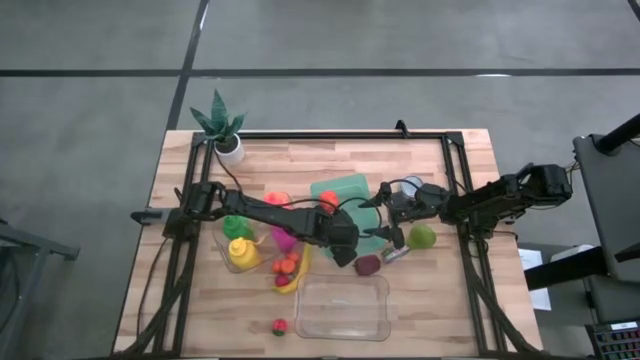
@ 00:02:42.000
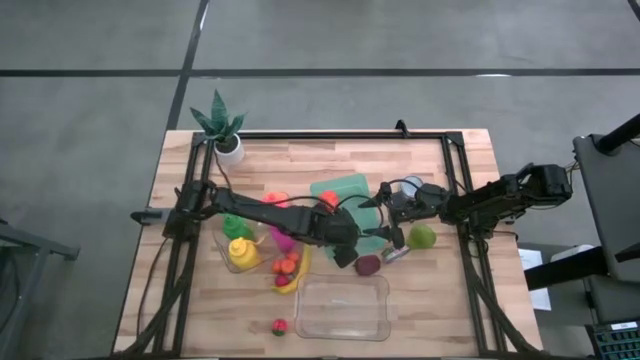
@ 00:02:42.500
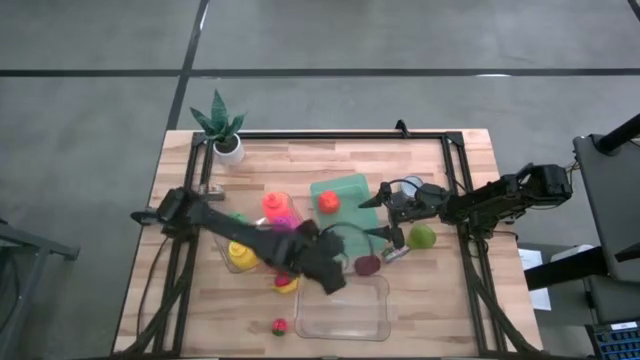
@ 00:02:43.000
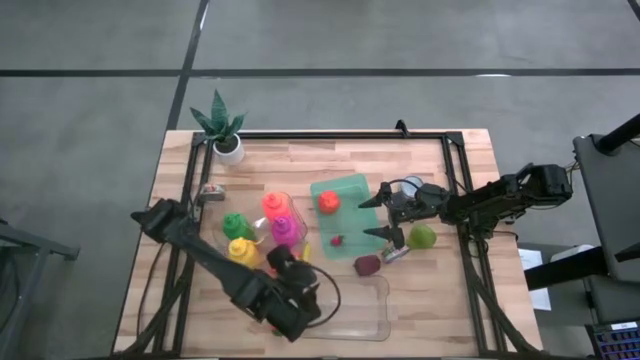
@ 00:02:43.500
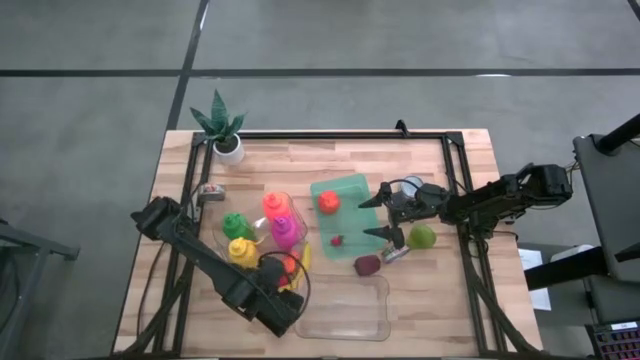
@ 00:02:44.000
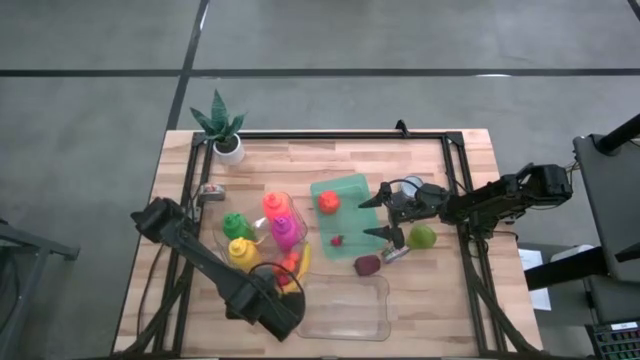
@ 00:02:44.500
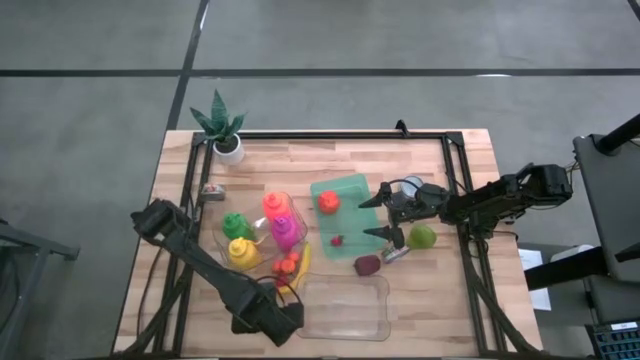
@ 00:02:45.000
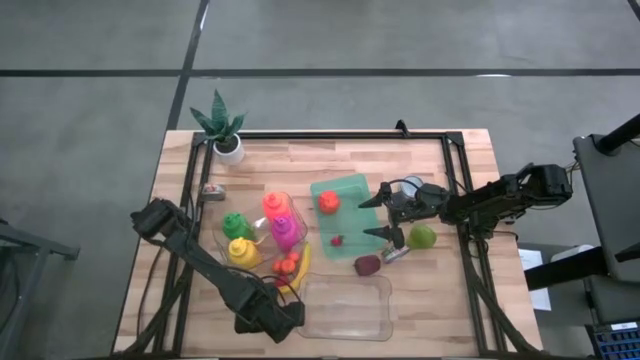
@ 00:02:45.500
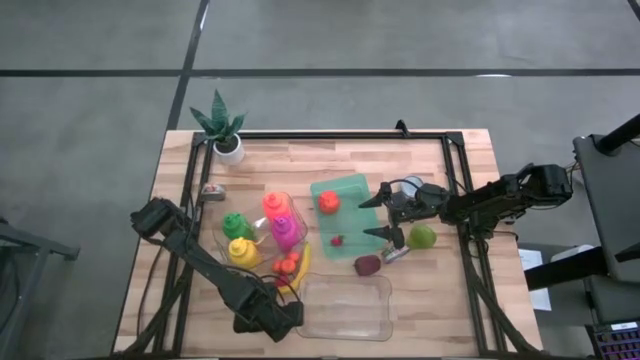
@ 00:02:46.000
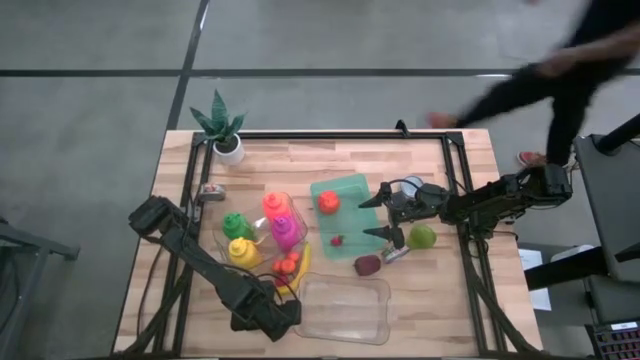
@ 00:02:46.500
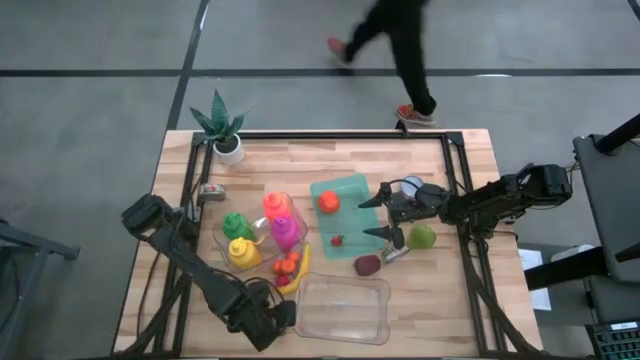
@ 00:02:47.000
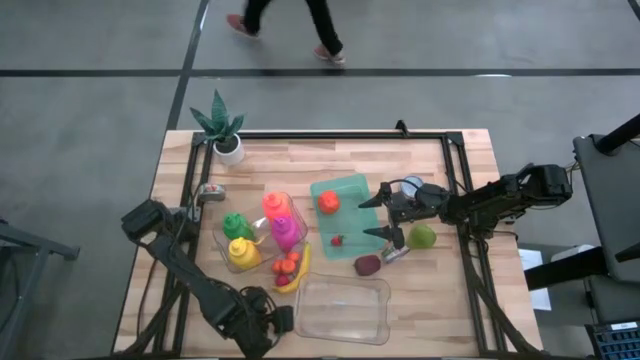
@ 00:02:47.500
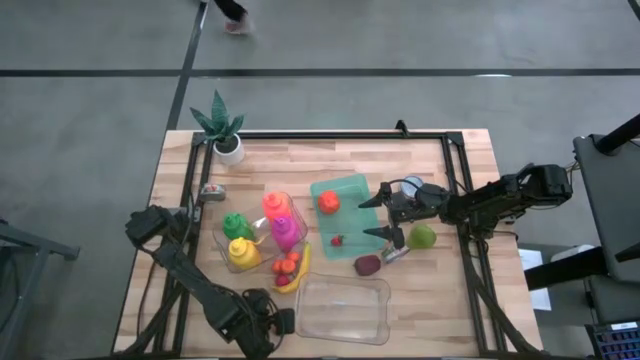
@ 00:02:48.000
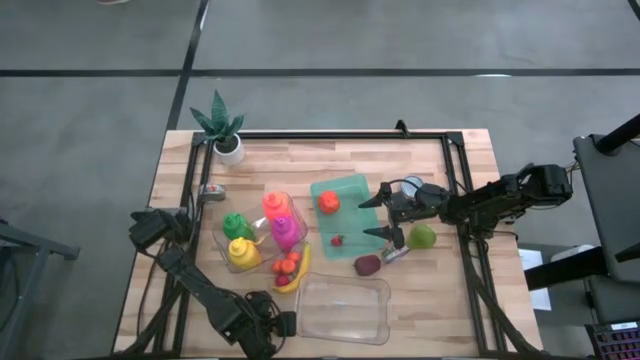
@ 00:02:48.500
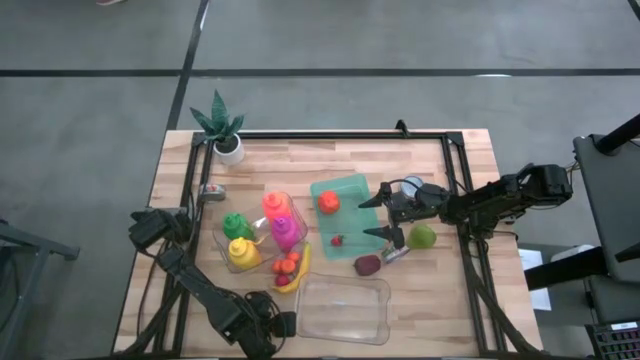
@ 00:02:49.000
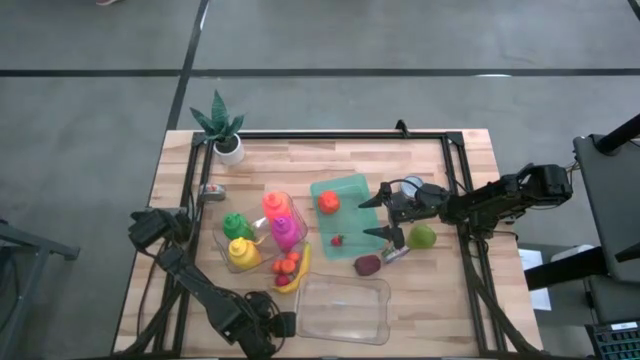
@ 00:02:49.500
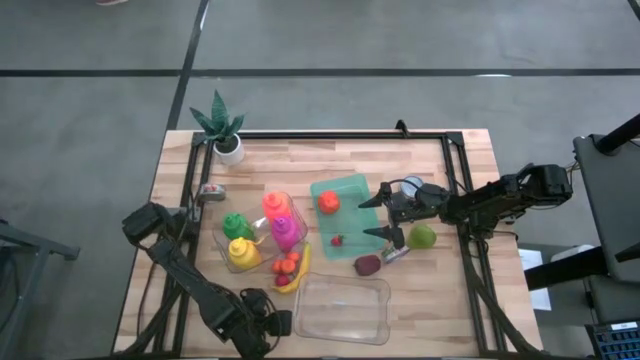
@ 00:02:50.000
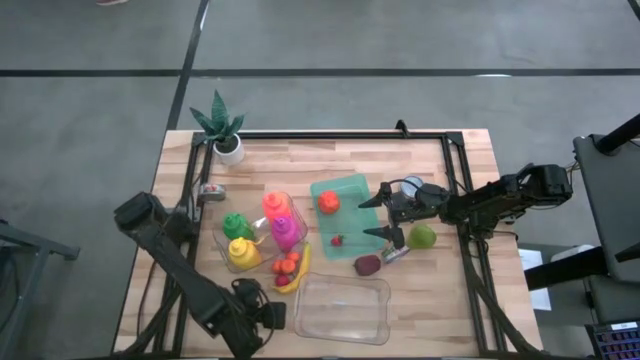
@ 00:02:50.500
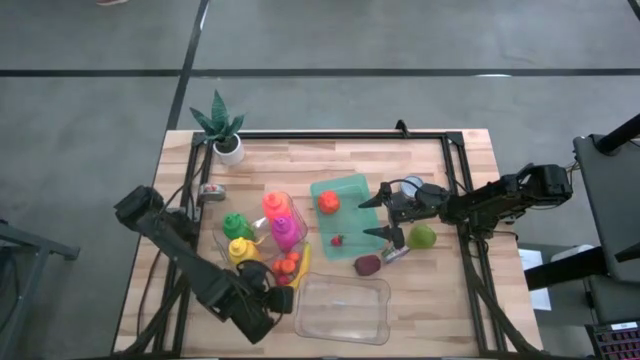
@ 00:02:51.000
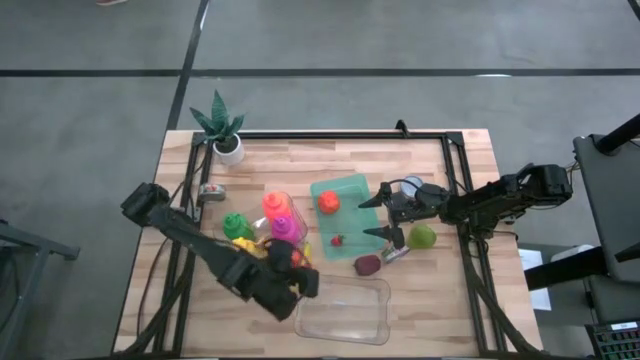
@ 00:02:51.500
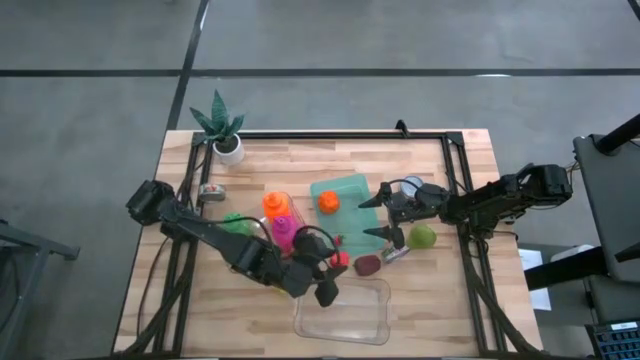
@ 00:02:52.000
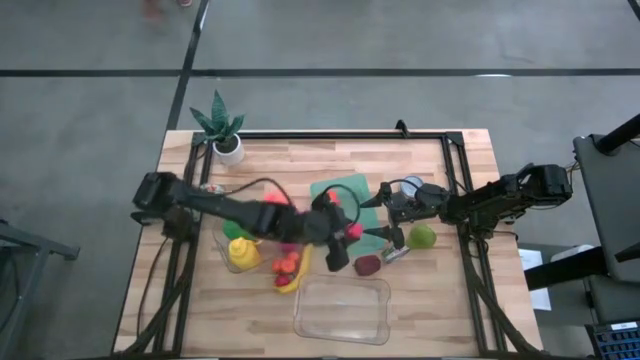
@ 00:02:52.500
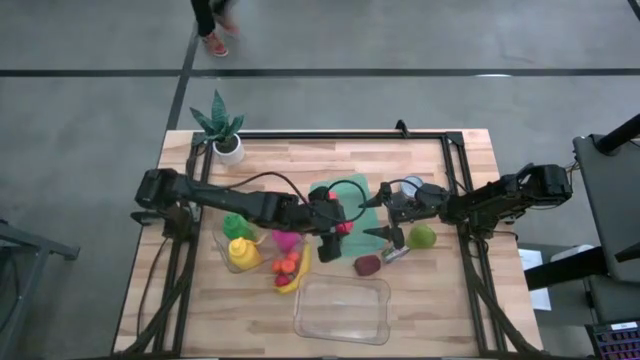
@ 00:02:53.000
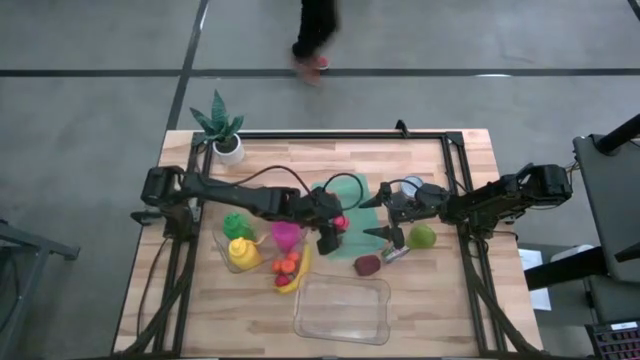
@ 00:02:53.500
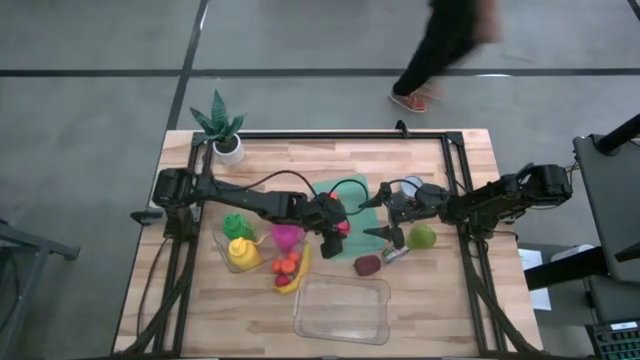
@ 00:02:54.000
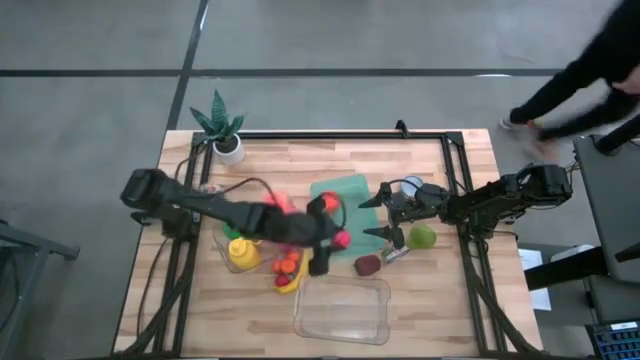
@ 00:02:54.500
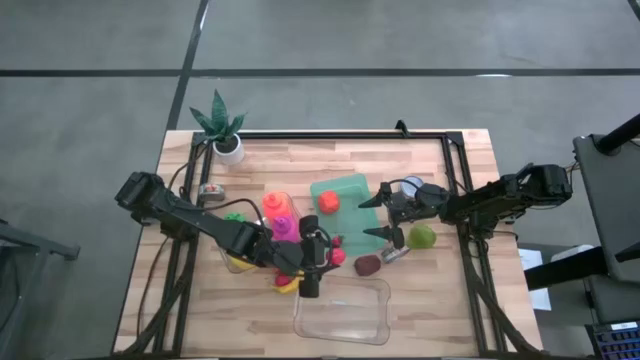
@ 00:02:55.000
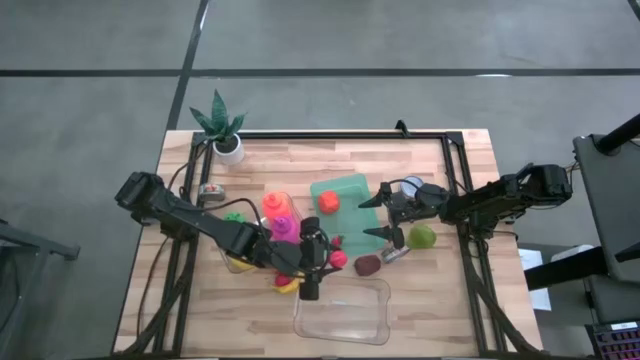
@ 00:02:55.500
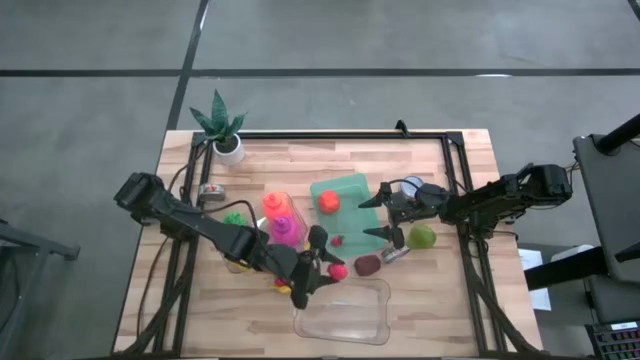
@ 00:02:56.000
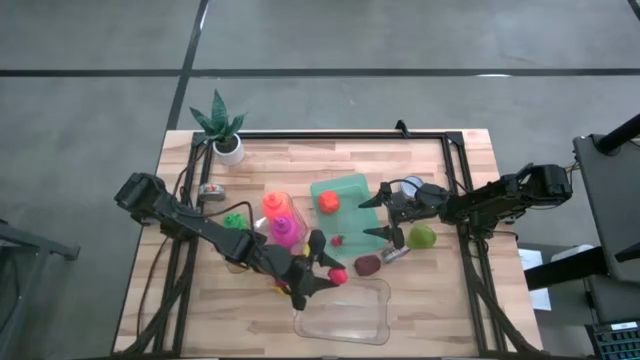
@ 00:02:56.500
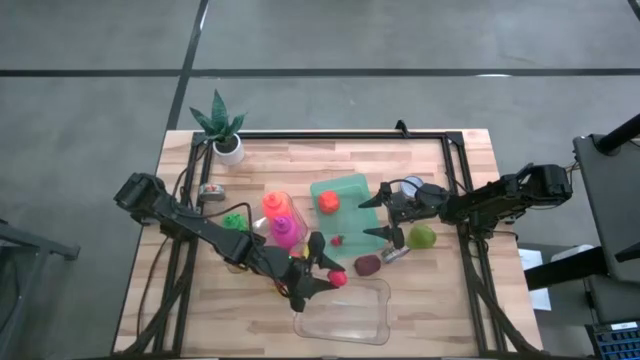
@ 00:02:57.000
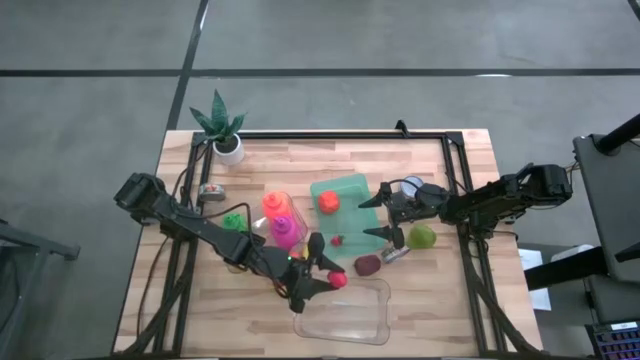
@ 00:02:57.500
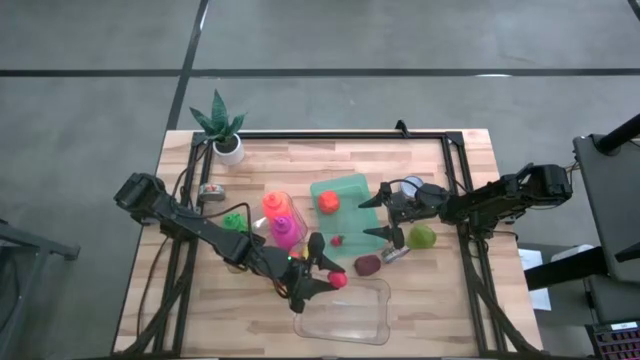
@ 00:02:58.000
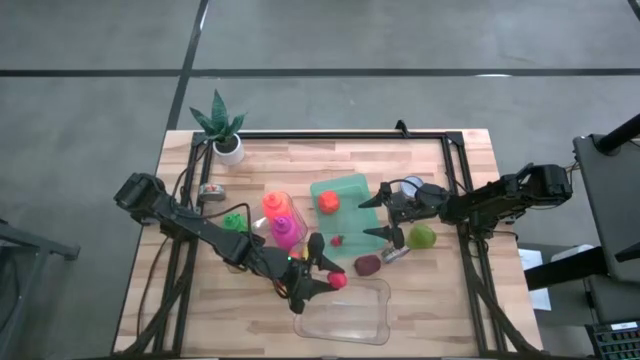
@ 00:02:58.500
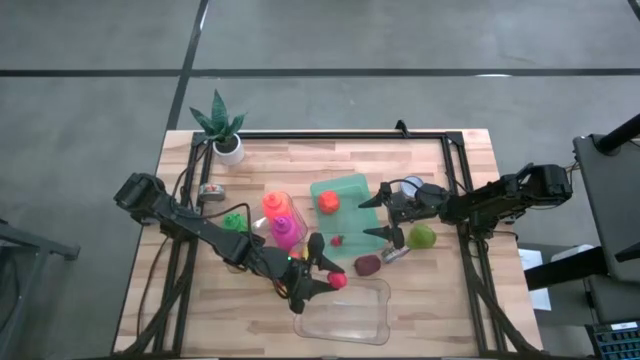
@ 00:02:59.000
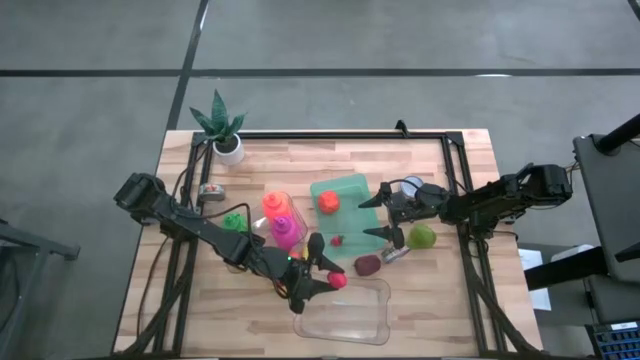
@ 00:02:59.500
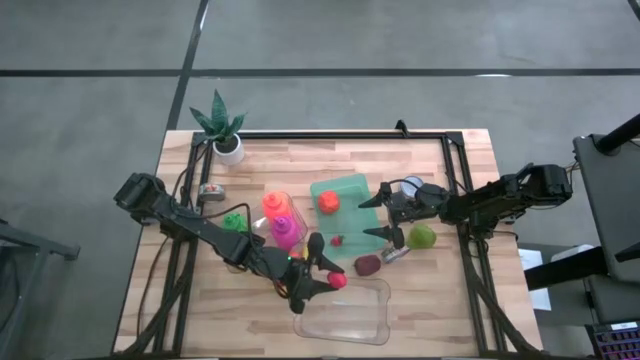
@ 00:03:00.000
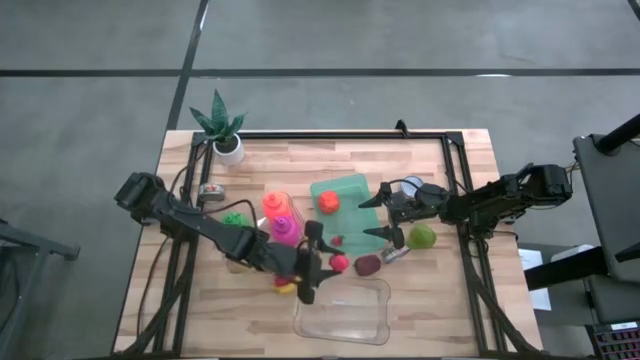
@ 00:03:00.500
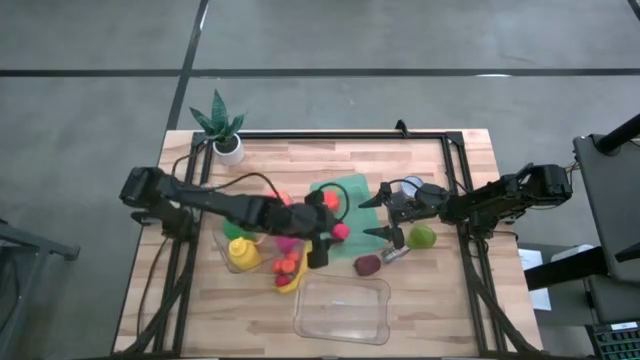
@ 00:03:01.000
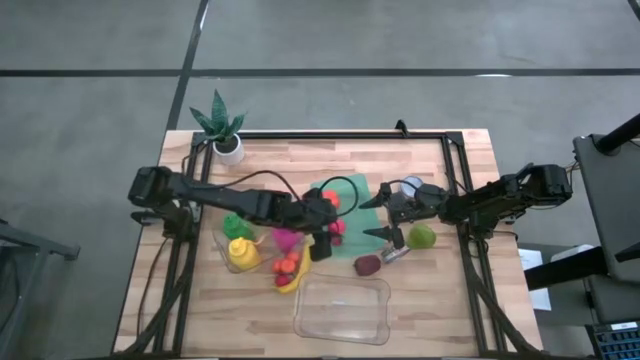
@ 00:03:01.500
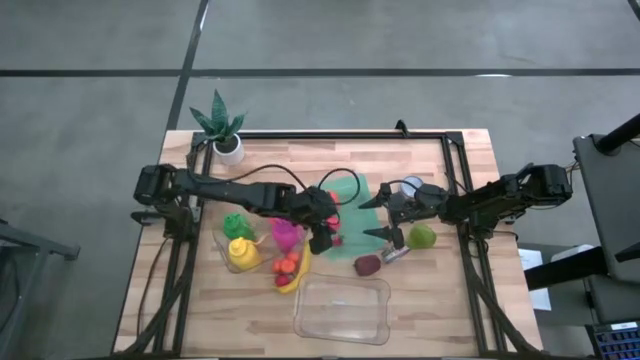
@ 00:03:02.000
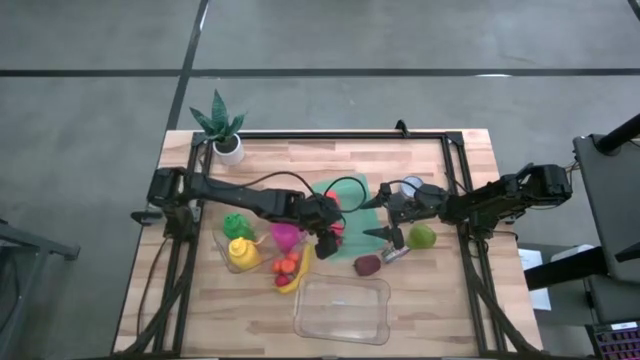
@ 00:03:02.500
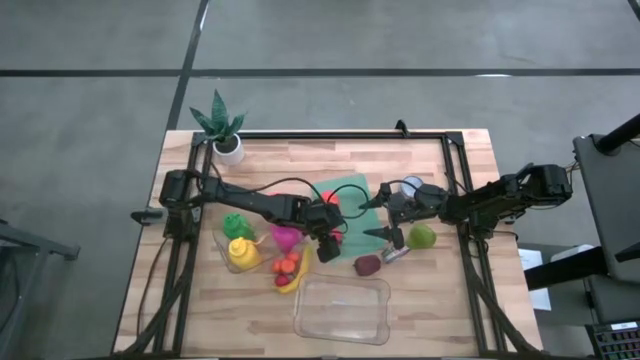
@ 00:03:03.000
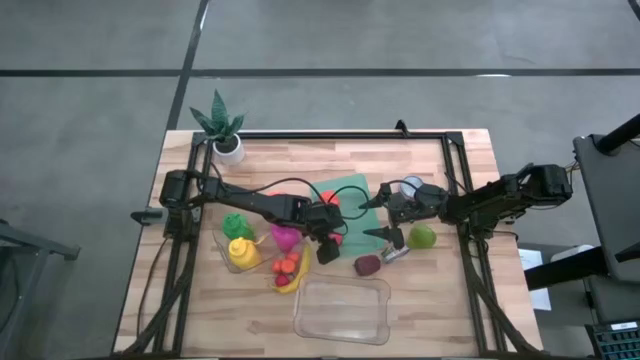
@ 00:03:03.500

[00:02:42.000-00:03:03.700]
Task: Pick & Place Food Item
Put the bottom red strawberry into the green bin

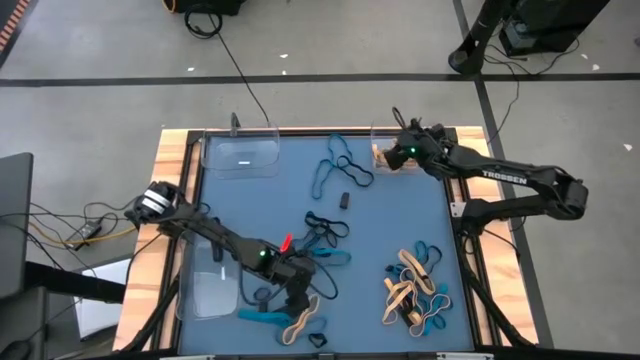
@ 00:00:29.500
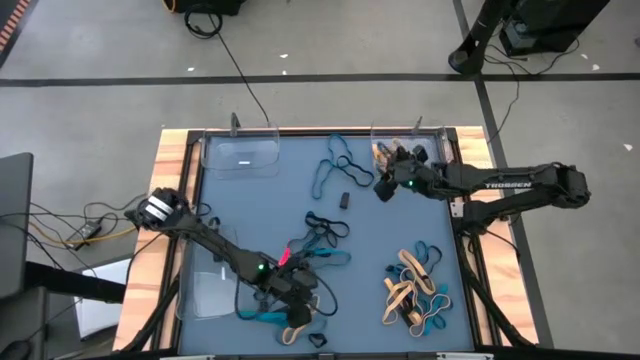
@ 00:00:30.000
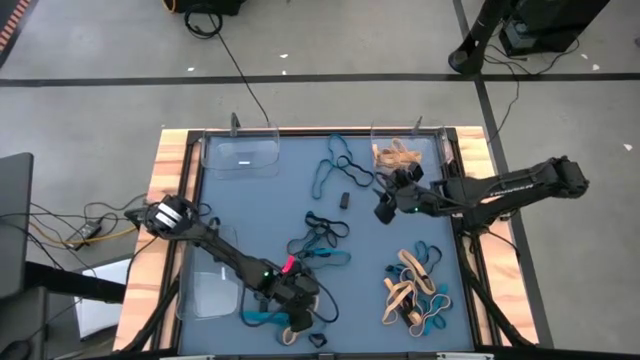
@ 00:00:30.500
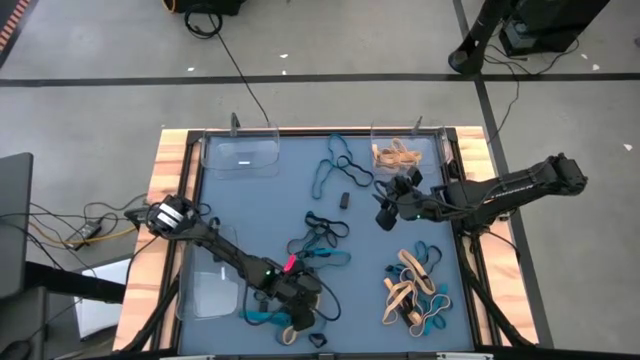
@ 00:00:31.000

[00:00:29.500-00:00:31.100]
Task: Sort rubber bands into baskets
Put the yellow rubber band into the top right transparent bin
